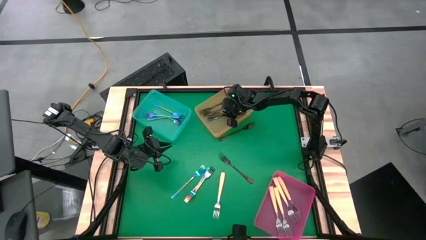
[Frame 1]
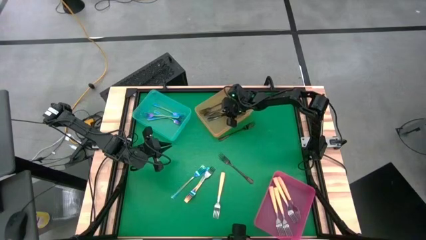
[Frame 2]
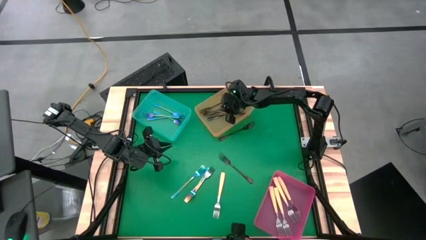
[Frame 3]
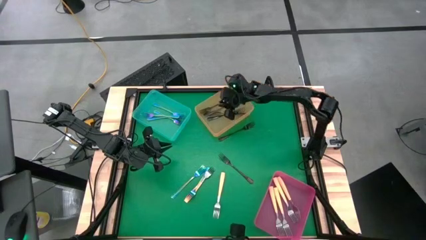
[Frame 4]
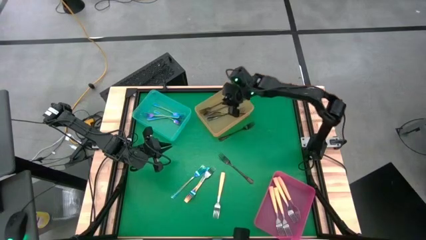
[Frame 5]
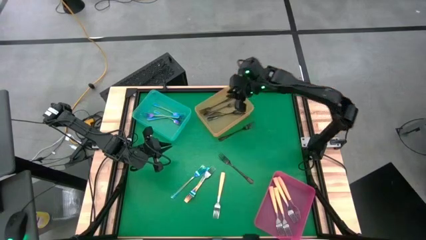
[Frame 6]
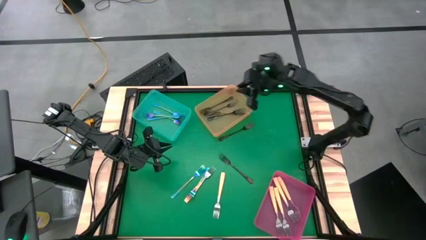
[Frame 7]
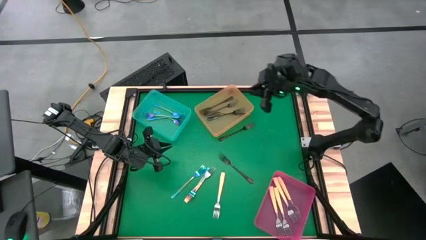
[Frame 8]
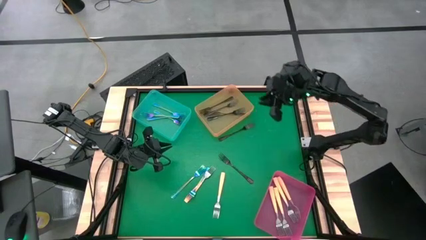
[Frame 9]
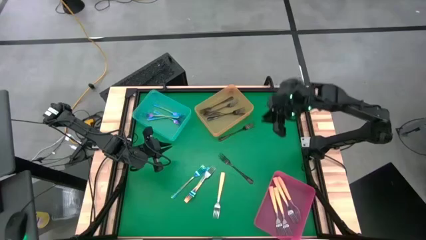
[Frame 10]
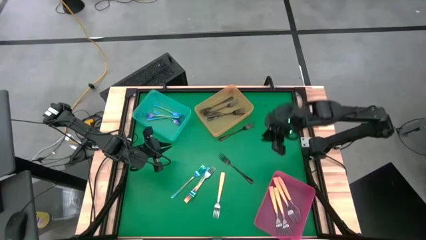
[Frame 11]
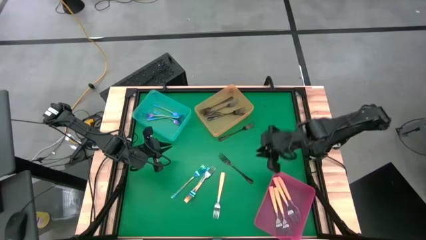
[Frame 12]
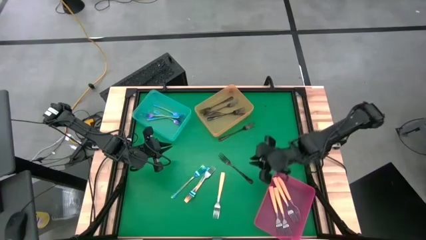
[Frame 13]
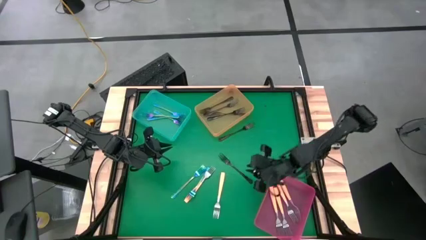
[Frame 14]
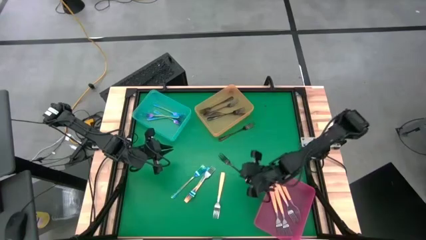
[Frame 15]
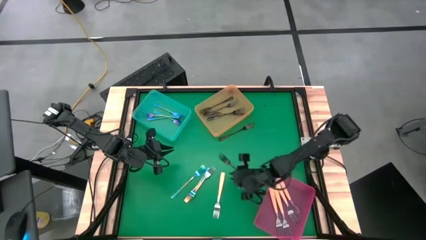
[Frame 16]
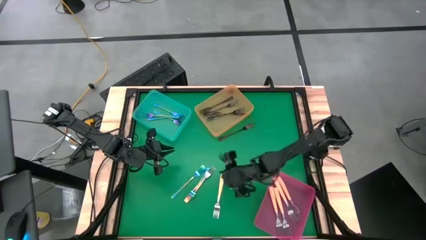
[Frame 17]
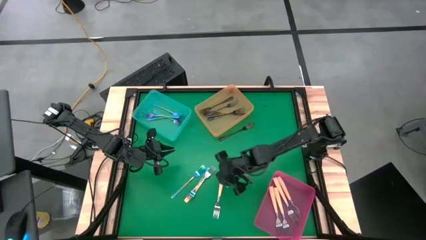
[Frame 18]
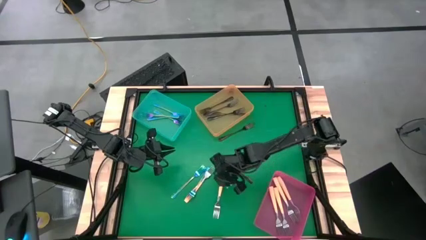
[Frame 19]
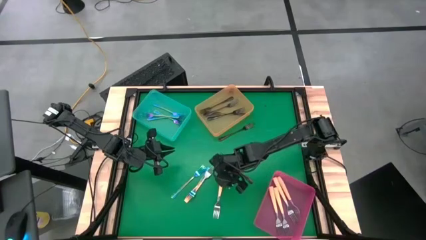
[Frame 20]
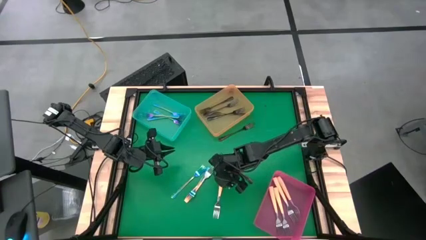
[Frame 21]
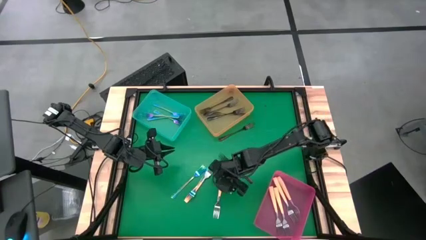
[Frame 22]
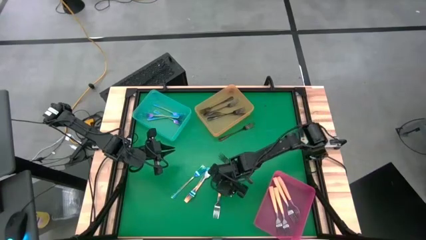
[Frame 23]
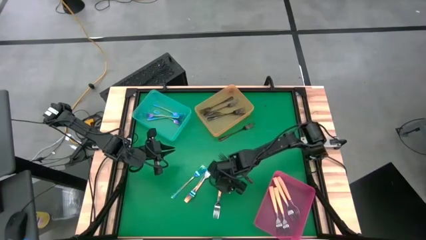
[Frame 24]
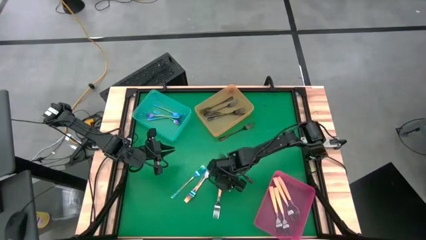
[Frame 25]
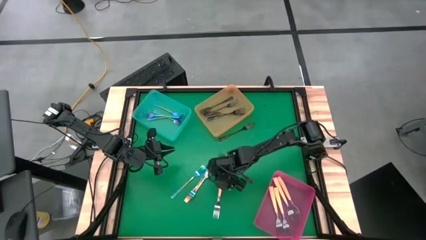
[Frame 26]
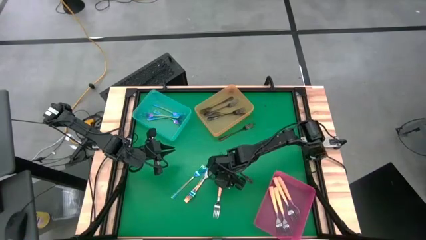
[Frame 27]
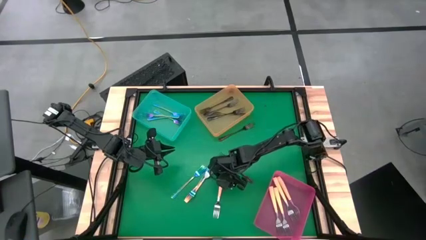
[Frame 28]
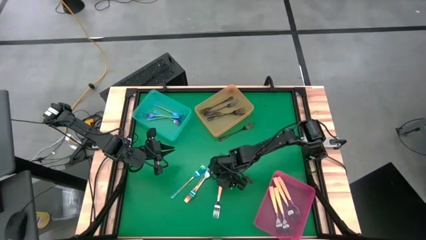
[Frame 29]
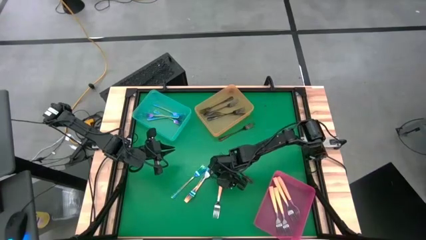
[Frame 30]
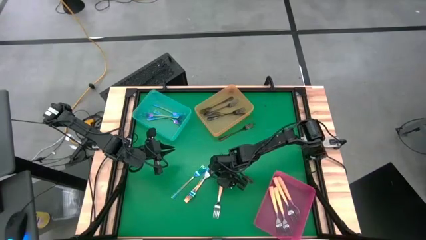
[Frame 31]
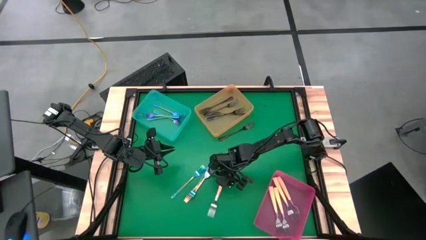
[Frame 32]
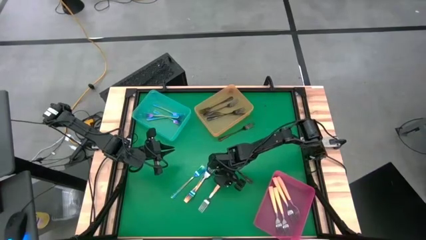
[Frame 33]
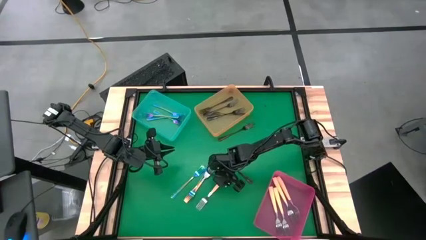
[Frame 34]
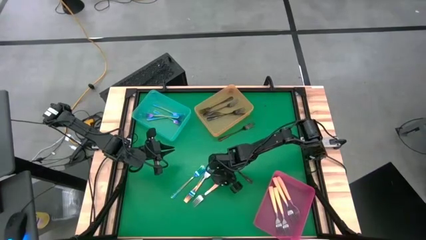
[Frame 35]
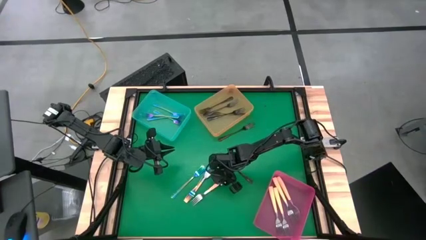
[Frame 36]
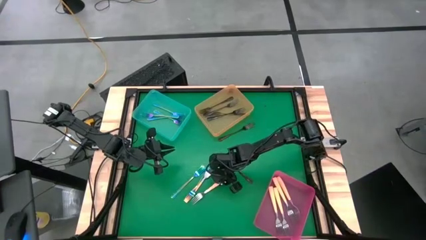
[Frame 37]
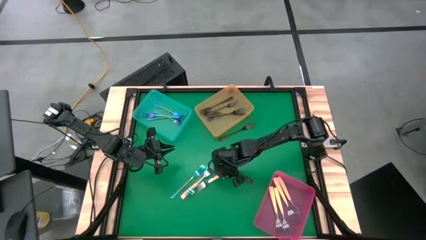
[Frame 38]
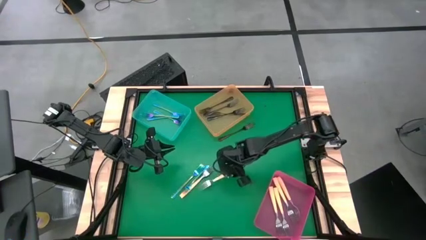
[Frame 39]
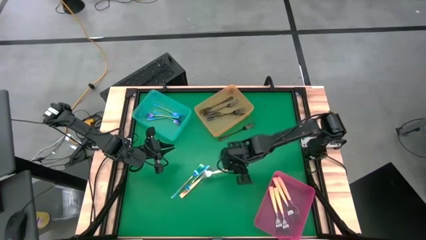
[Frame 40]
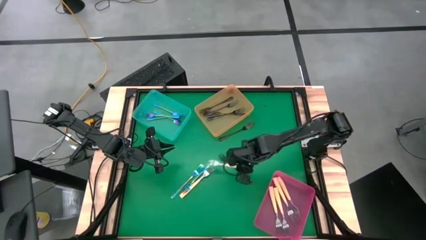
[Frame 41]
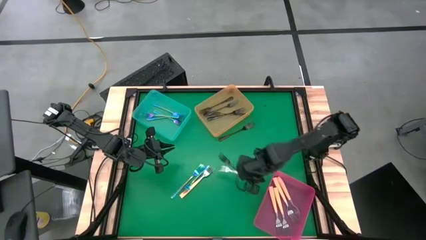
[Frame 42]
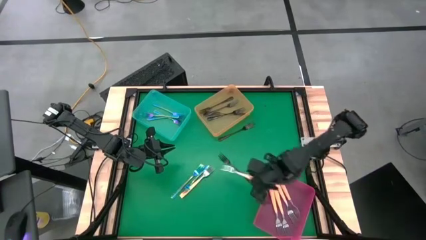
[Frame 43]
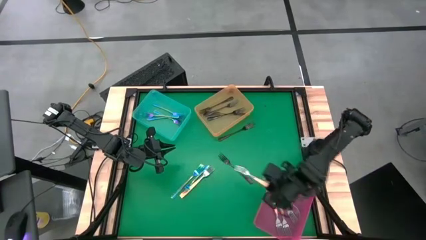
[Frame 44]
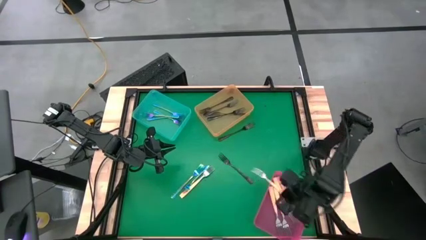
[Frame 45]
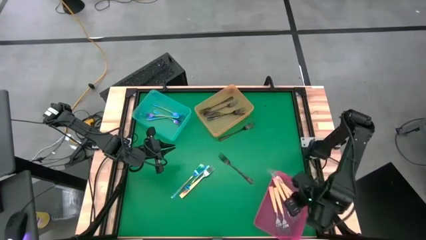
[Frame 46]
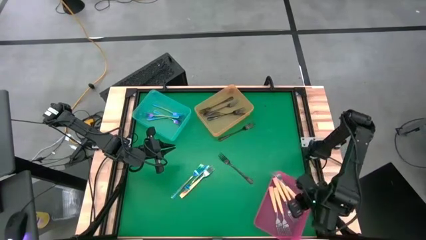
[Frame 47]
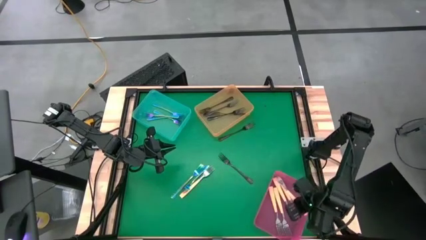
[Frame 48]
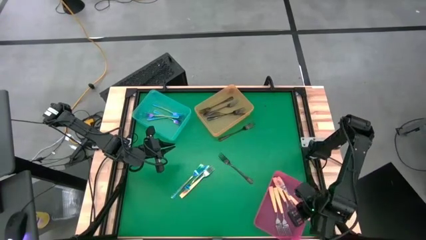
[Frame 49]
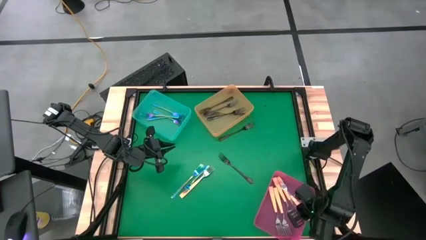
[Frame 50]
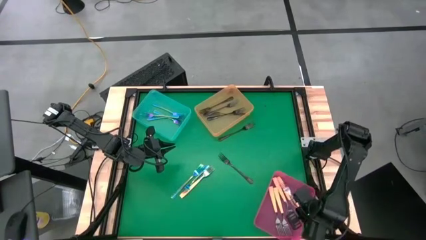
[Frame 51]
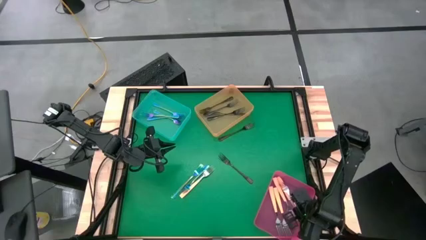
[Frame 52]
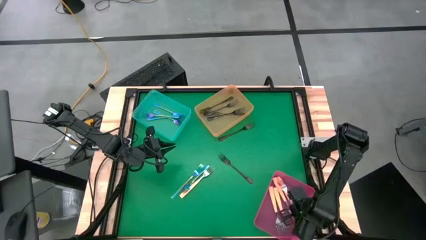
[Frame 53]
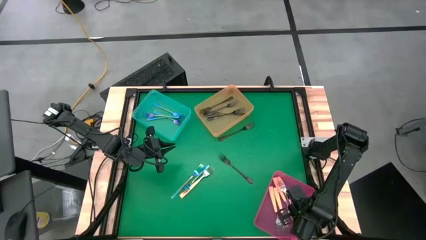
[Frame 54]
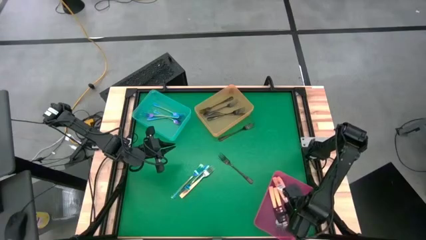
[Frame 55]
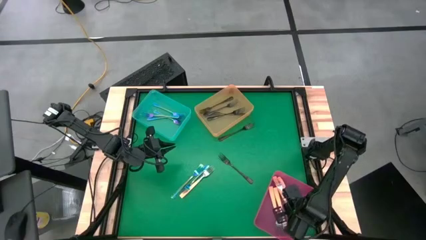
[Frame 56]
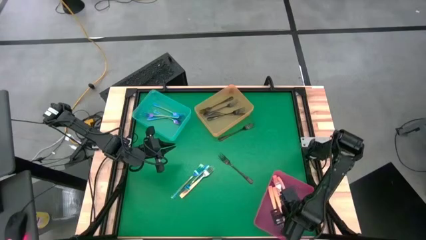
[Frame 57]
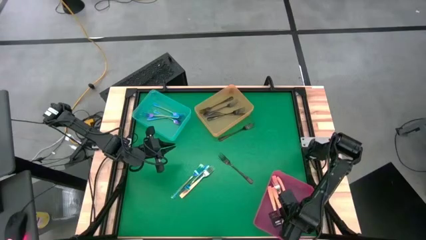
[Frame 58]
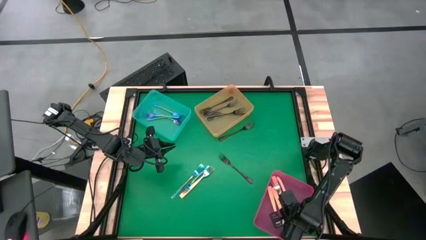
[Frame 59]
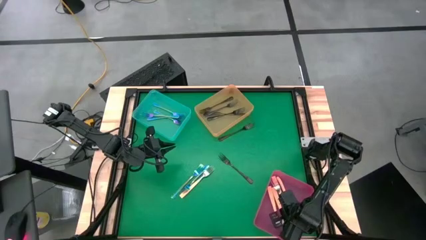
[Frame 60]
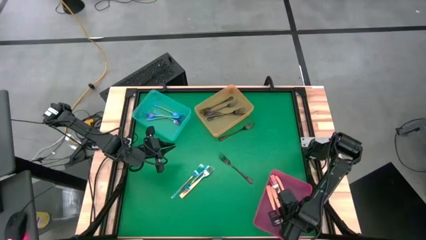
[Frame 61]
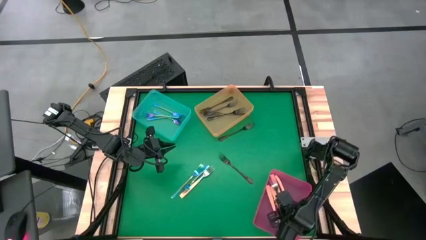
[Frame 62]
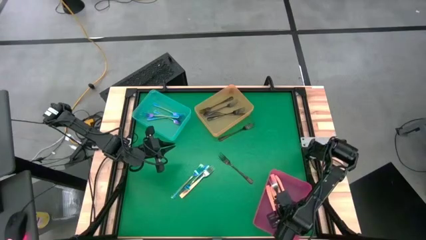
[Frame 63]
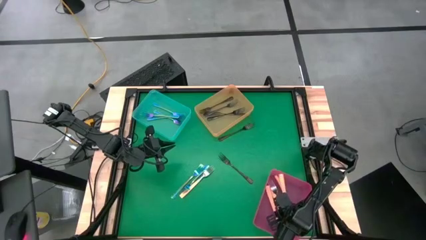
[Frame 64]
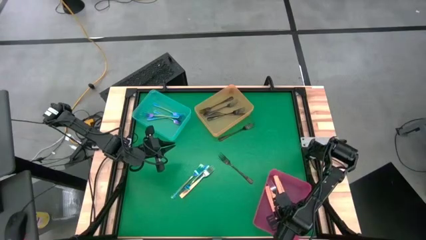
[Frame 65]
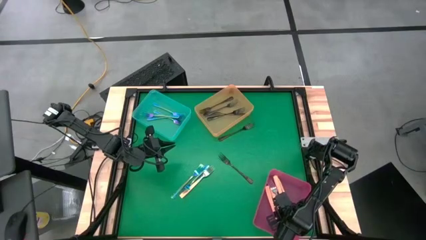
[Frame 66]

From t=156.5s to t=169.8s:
Task: Sort silverware by color (type)
Put the yellow fork into the pink bin
